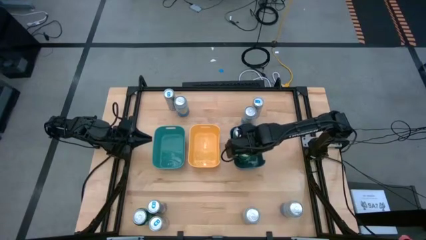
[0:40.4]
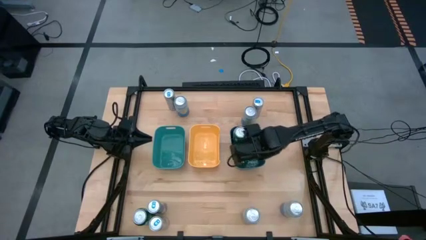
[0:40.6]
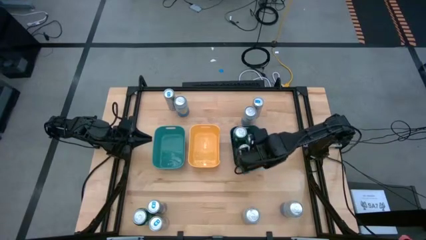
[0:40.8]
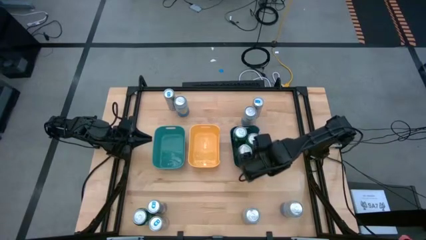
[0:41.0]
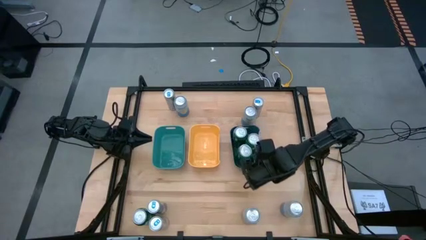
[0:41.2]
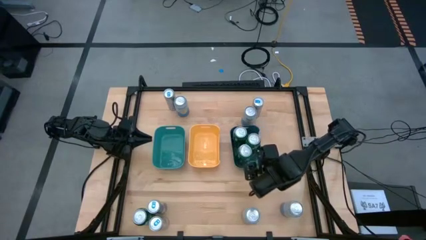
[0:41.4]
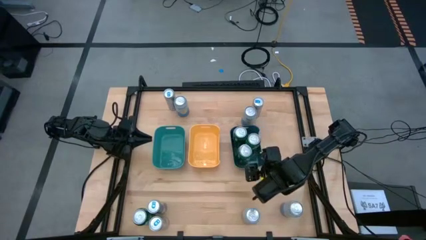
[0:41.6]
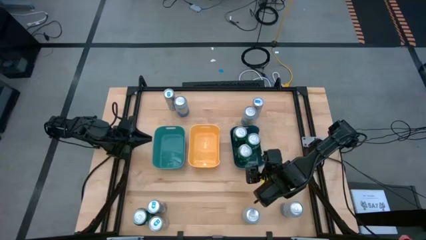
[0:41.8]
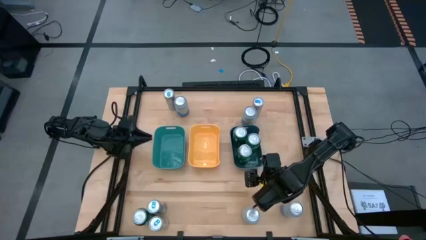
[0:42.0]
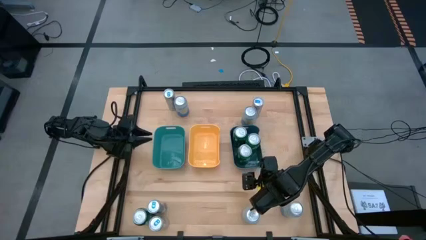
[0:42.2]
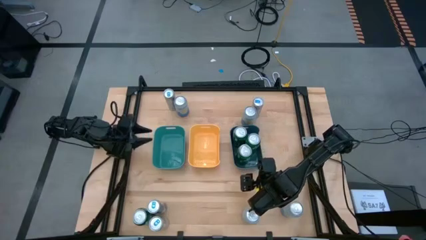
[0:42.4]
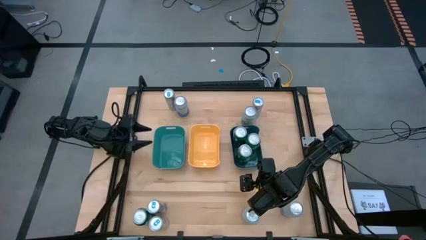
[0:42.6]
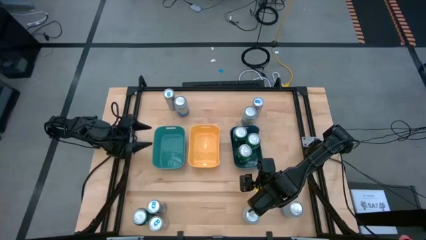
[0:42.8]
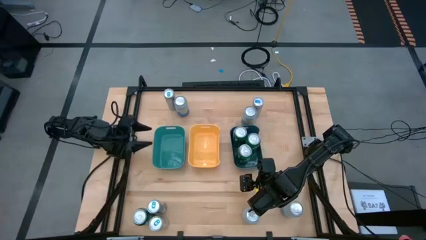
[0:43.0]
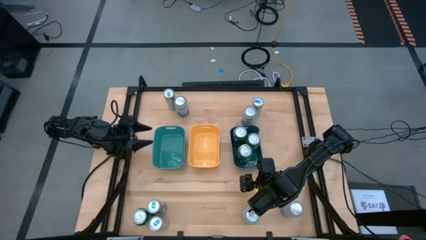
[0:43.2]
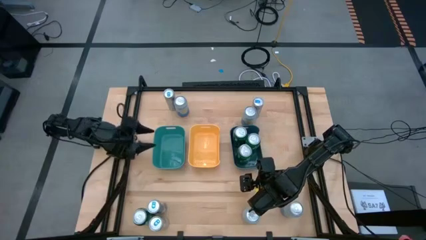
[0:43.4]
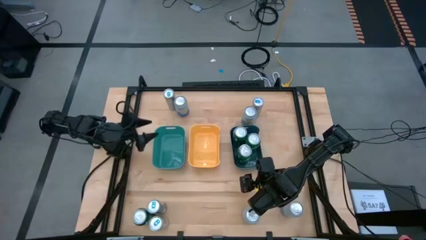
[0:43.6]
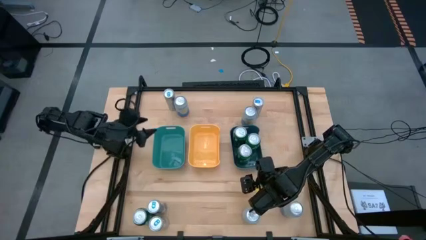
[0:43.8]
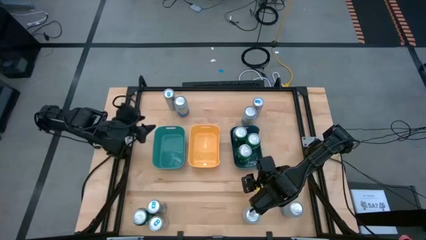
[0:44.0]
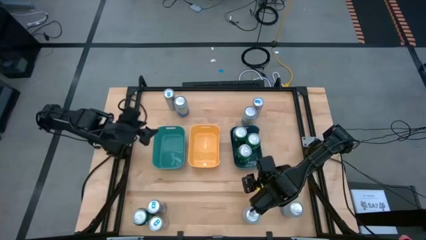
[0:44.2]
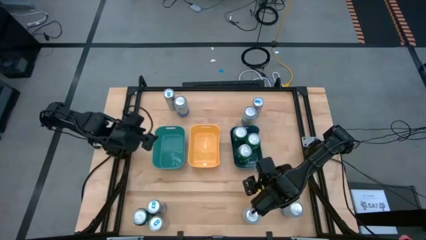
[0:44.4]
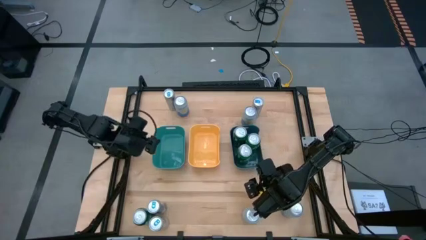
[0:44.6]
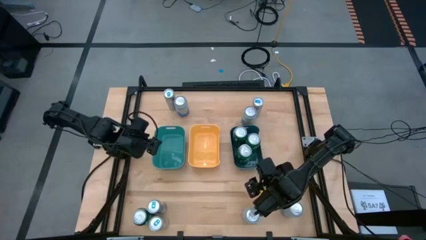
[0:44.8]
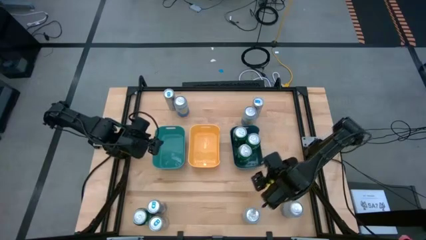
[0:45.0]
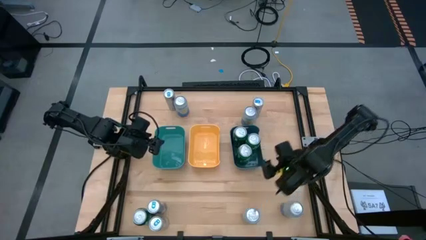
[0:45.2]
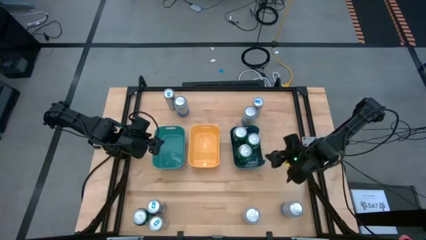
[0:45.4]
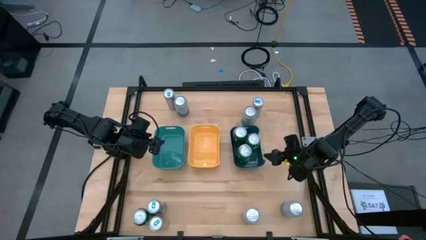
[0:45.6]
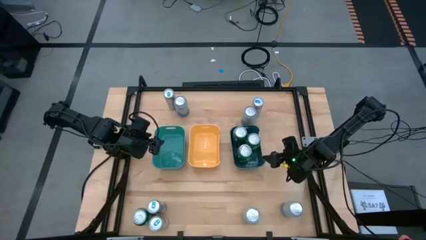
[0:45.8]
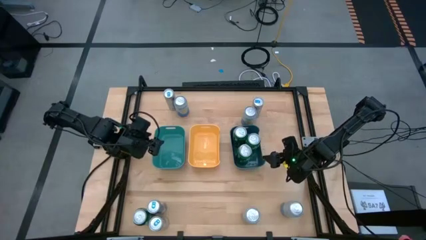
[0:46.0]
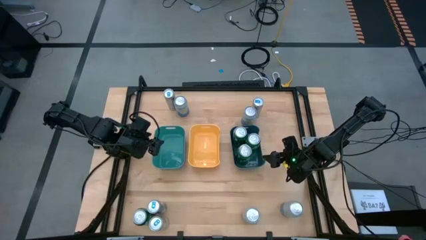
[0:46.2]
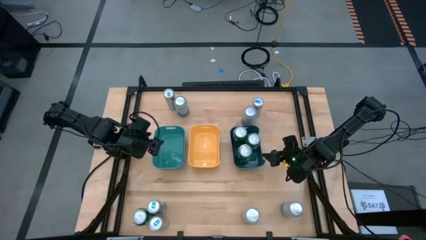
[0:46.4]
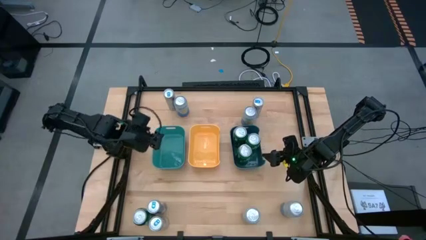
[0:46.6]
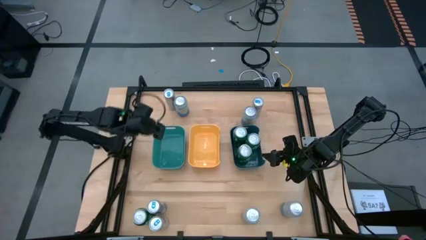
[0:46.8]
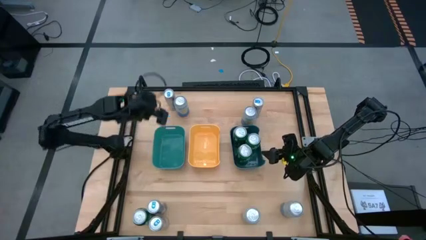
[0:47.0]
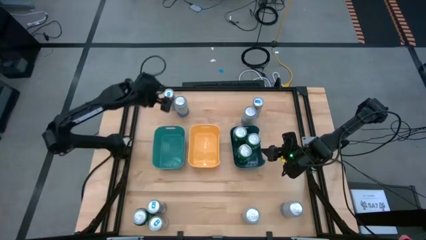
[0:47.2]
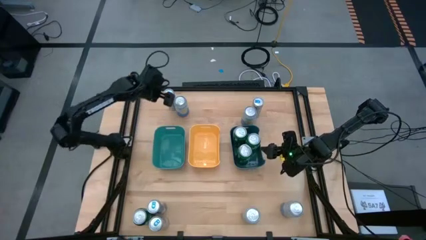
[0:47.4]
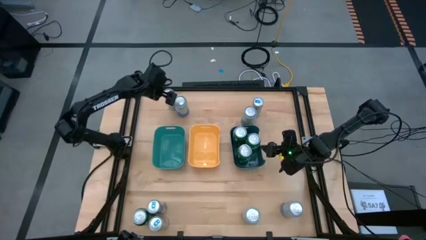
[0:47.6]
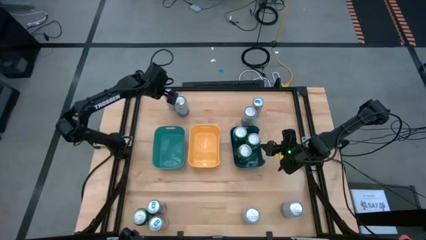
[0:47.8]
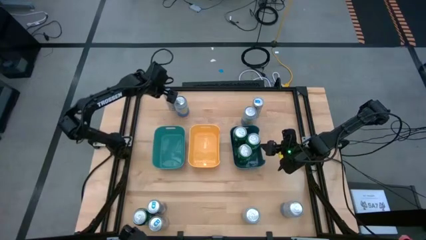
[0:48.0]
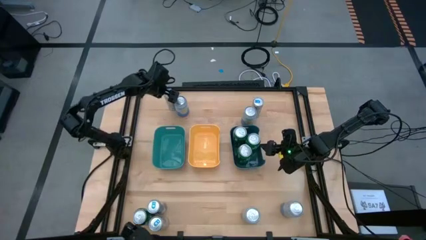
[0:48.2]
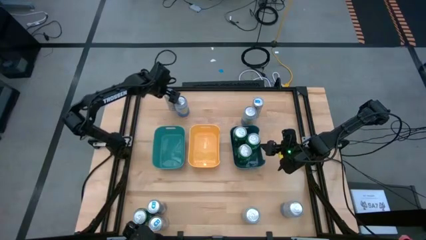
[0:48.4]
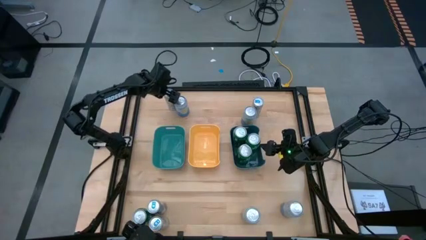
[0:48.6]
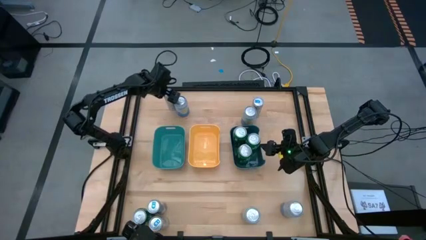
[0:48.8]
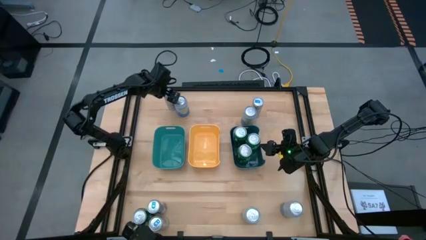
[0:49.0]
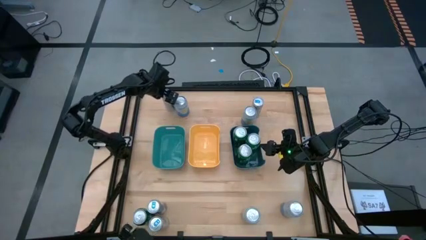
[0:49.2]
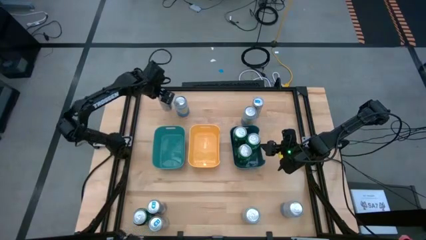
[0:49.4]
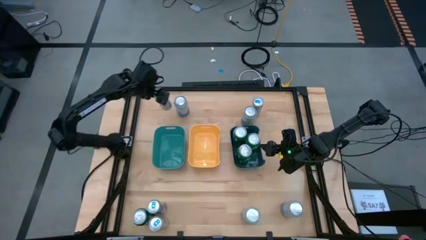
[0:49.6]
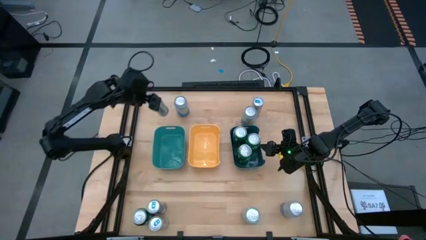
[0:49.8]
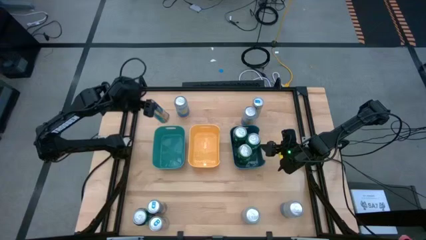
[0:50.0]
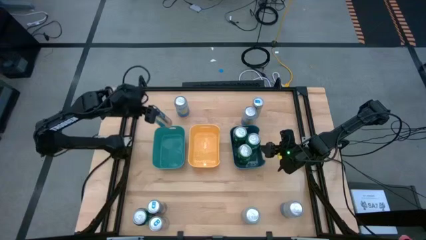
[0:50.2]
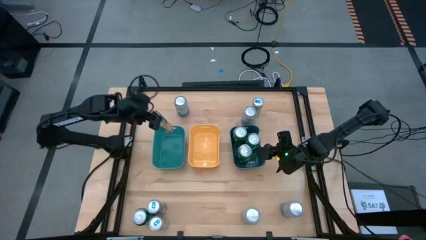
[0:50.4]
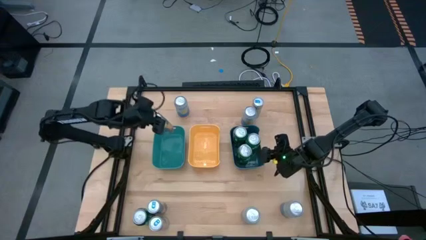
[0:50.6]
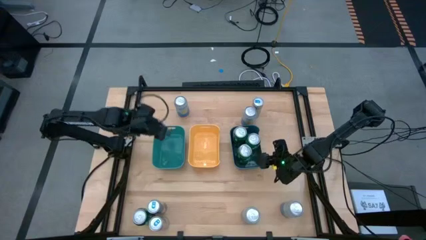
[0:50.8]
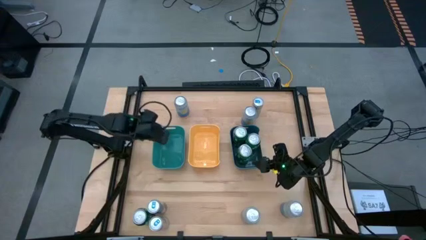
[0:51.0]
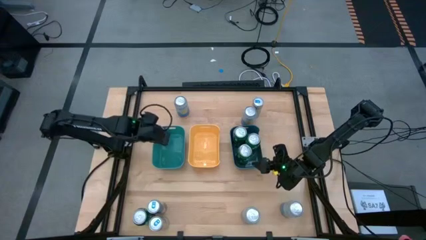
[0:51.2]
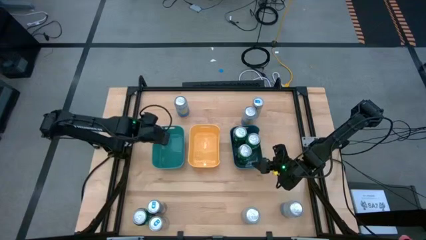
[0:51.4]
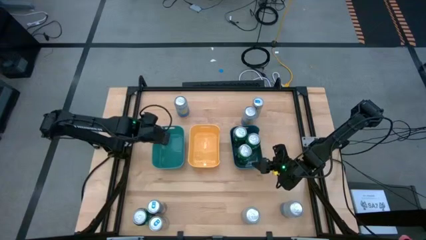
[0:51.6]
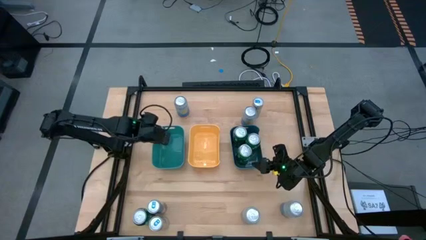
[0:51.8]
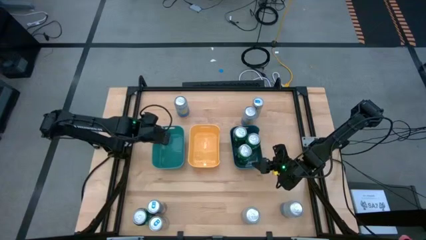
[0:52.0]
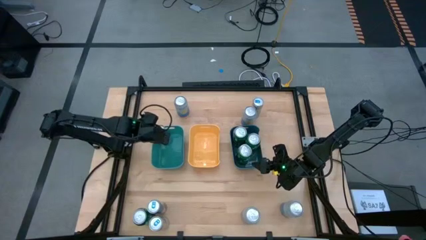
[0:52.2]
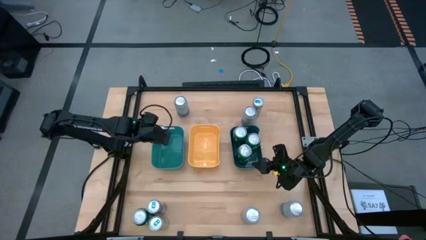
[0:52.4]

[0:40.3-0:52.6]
Task: Sort soda cans
Put the blue soda can into the green bin

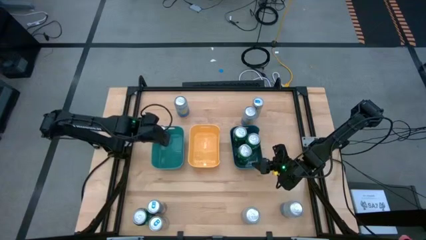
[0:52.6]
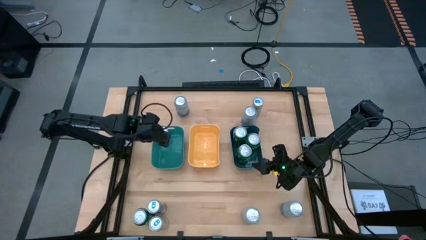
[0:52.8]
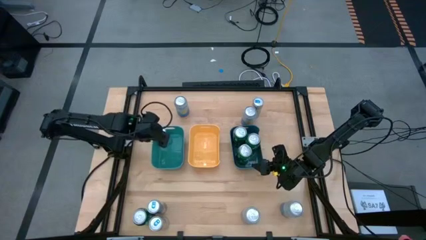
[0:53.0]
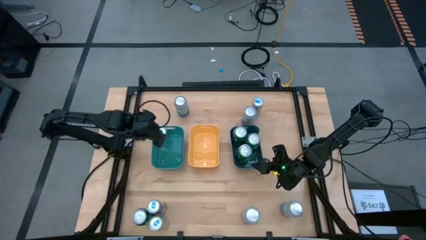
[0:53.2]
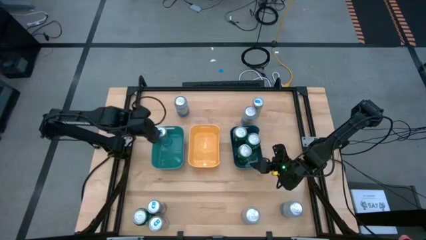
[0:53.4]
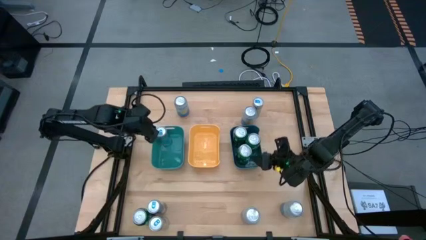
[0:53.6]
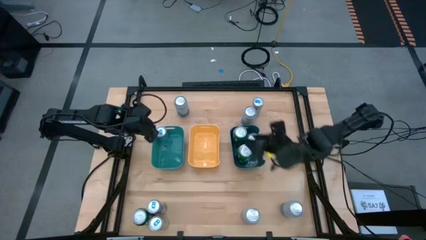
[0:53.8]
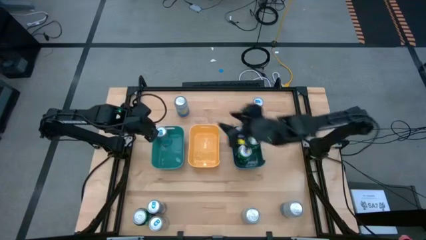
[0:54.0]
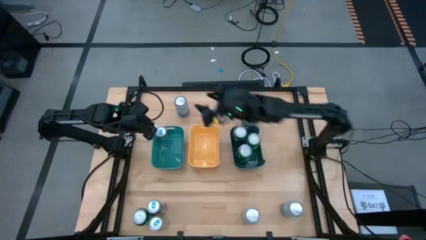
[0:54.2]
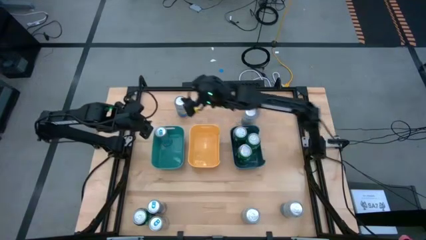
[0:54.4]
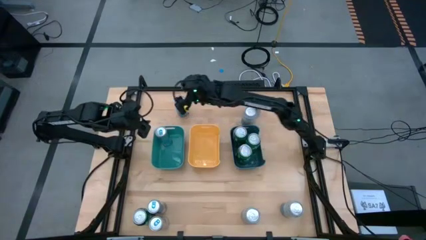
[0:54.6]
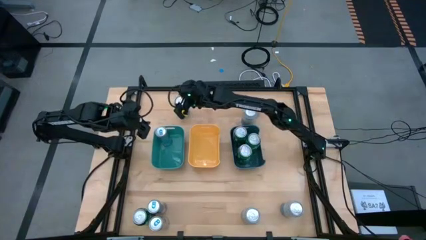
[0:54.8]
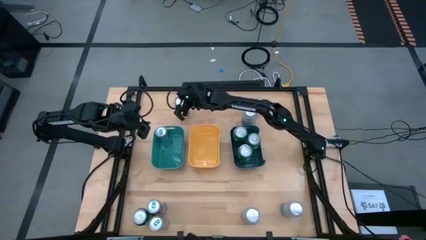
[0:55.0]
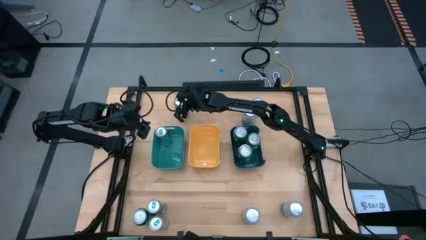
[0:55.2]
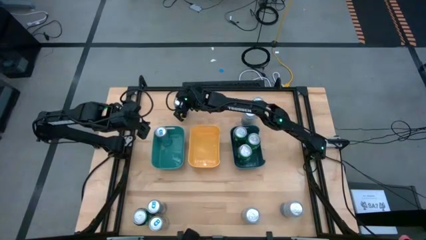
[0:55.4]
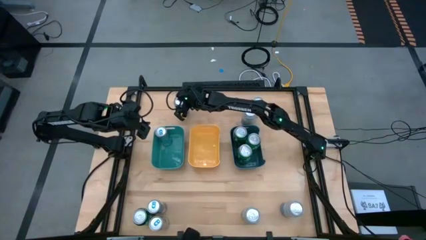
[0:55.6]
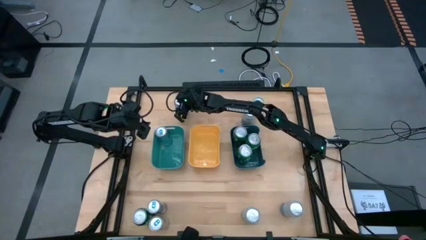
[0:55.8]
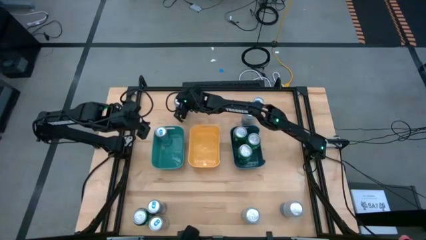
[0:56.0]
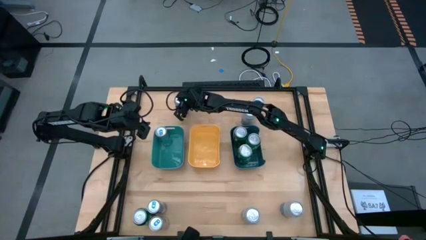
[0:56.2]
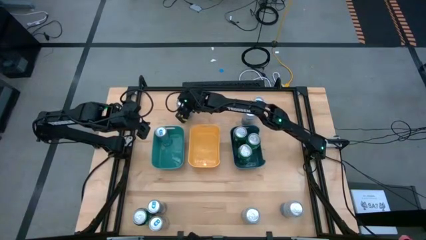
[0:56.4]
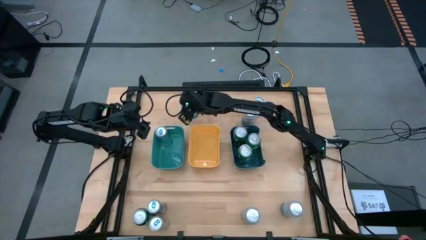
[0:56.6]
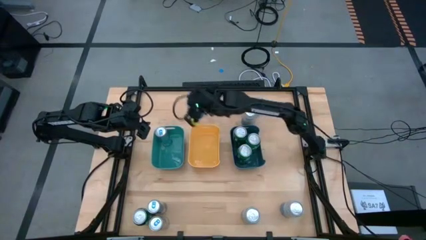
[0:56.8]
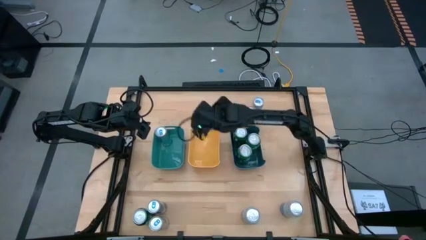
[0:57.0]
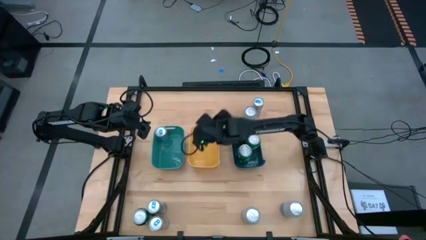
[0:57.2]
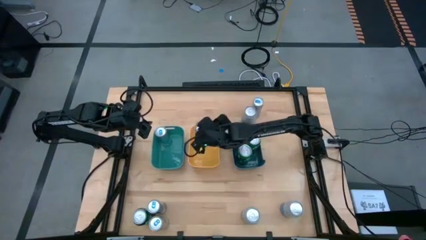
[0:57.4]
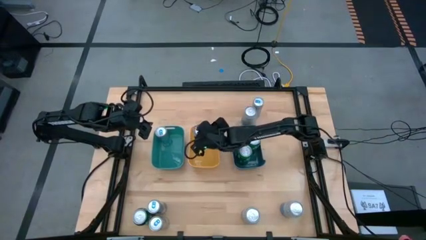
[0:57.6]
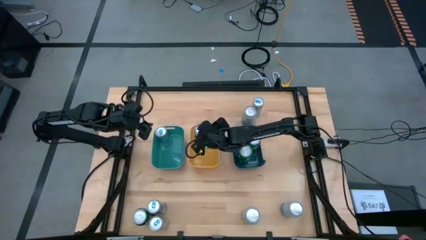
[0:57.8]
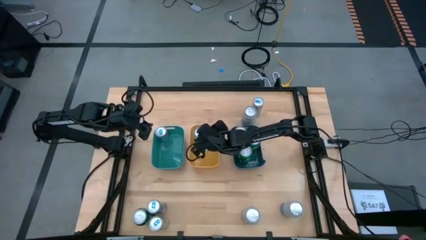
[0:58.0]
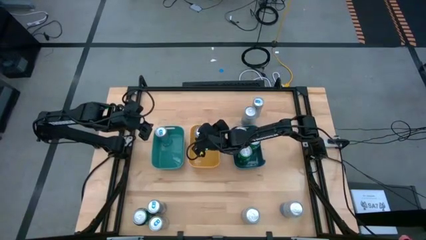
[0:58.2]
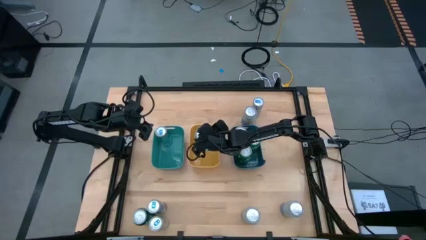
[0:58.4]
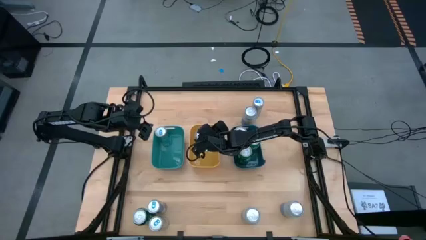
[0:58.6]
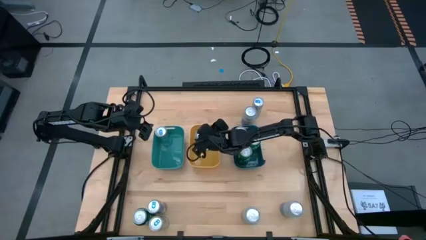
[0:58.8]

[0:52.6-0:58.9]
Put the blue-white soda can into the yellow bin
